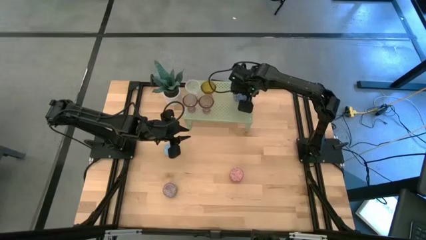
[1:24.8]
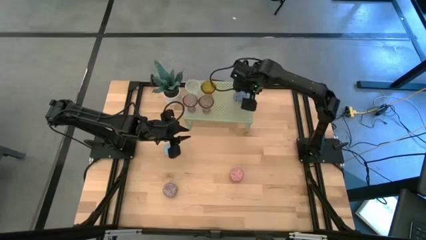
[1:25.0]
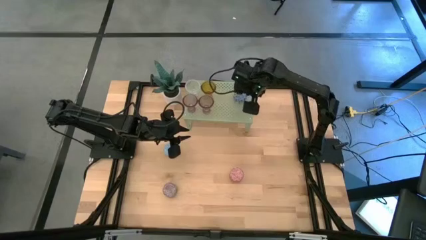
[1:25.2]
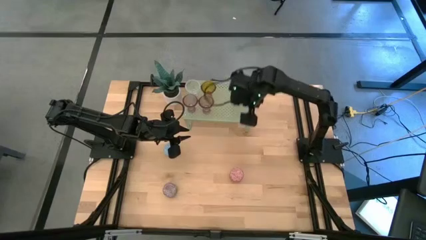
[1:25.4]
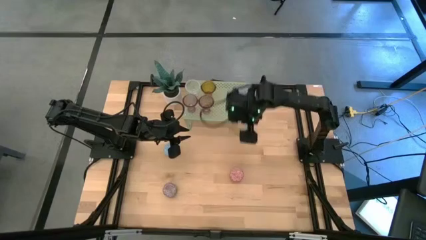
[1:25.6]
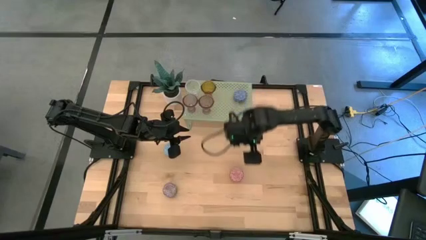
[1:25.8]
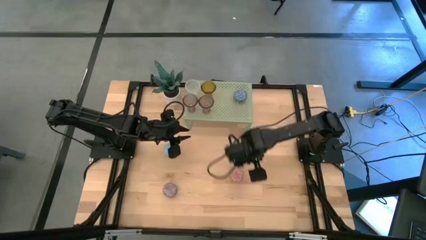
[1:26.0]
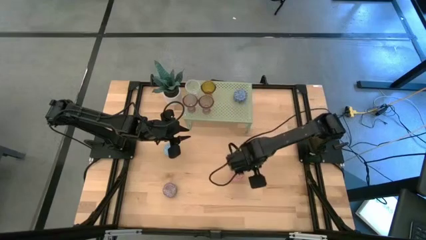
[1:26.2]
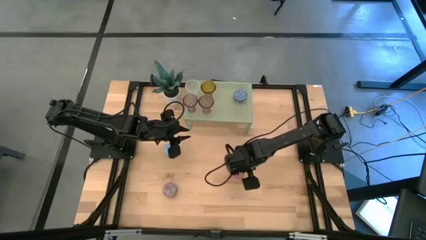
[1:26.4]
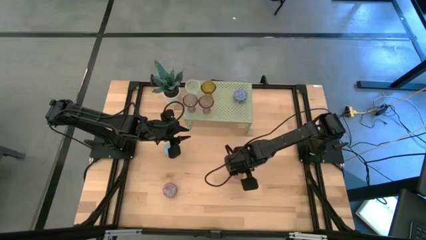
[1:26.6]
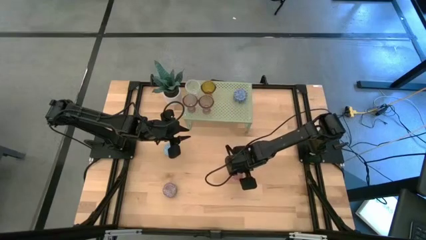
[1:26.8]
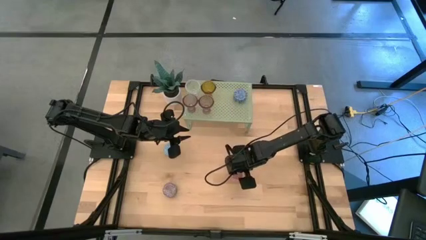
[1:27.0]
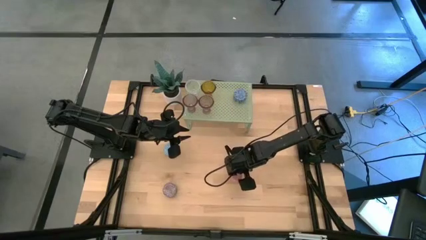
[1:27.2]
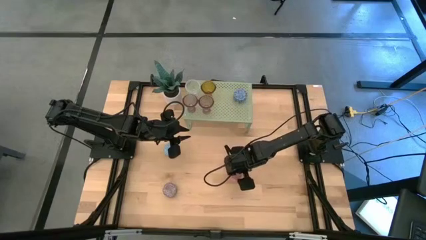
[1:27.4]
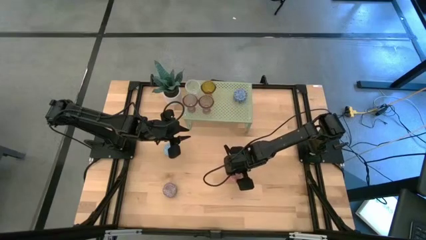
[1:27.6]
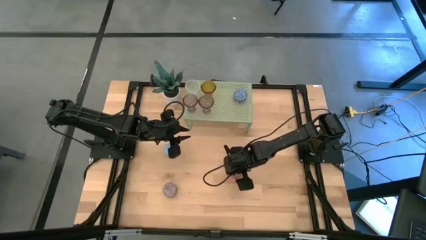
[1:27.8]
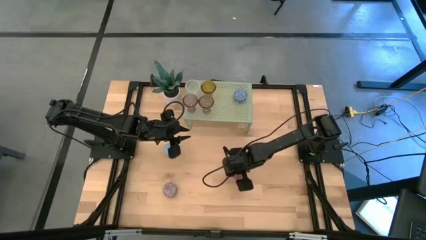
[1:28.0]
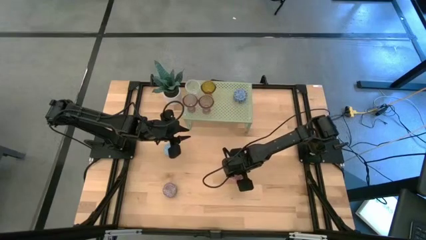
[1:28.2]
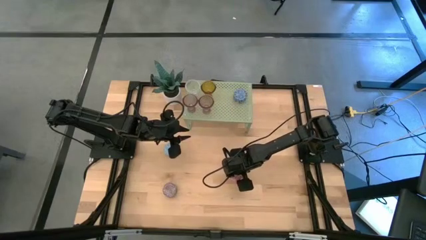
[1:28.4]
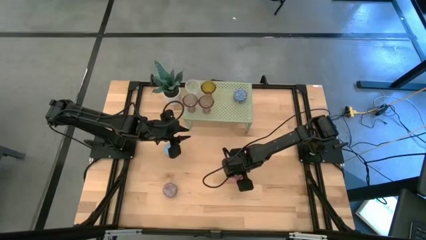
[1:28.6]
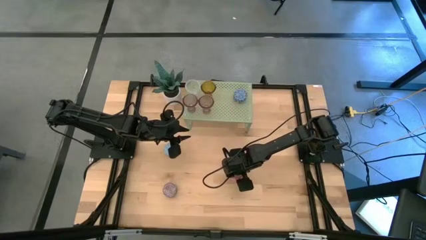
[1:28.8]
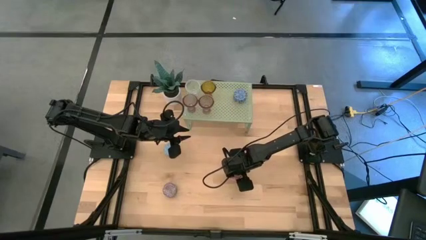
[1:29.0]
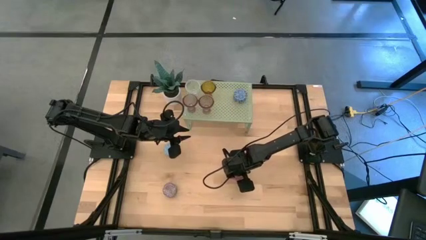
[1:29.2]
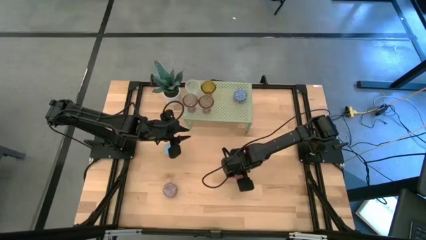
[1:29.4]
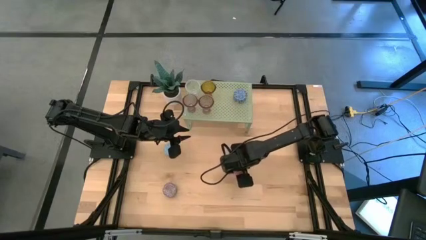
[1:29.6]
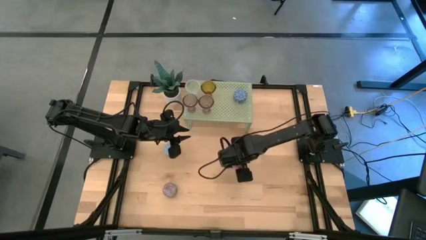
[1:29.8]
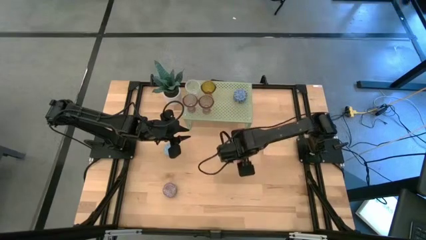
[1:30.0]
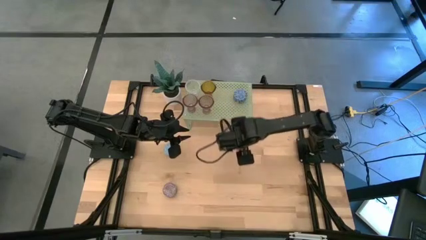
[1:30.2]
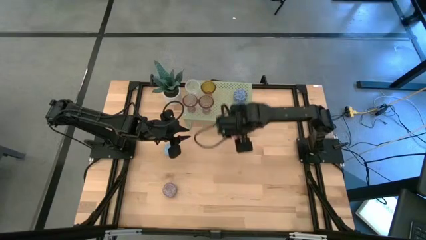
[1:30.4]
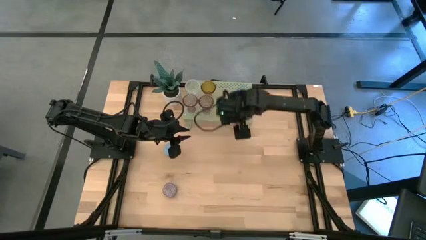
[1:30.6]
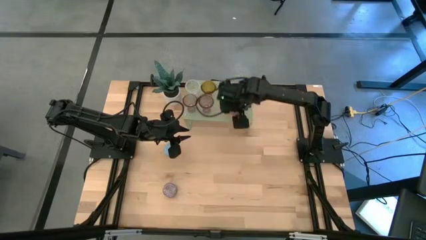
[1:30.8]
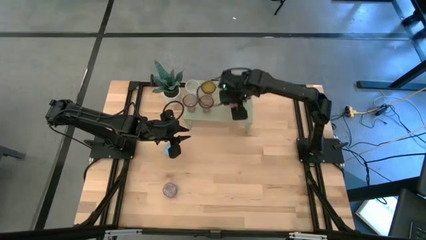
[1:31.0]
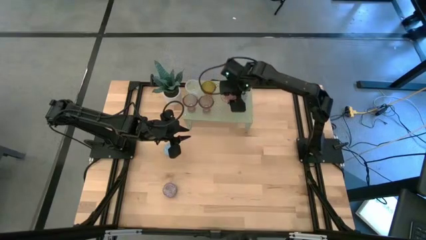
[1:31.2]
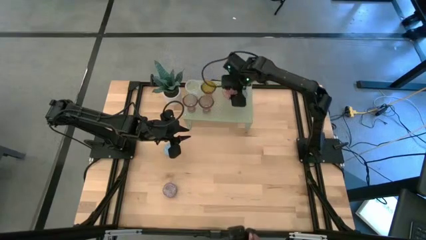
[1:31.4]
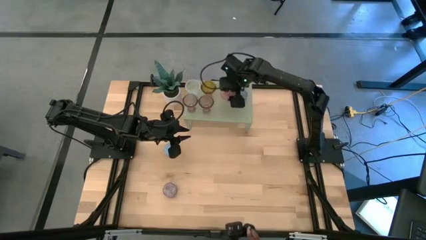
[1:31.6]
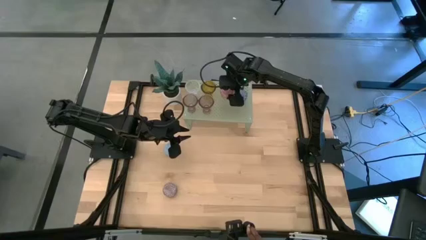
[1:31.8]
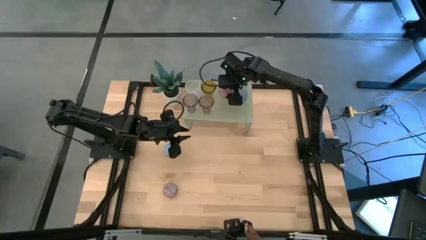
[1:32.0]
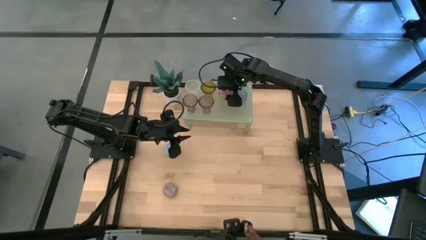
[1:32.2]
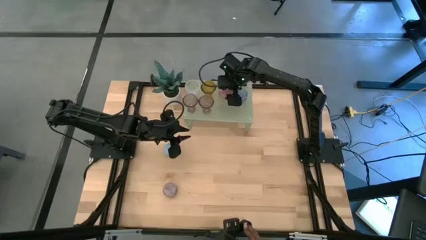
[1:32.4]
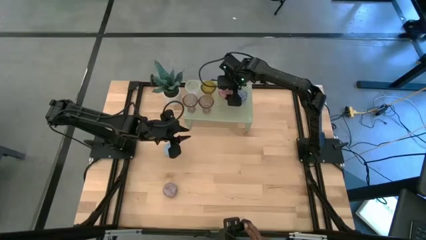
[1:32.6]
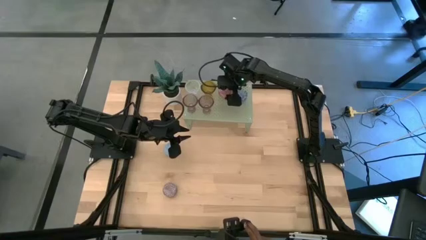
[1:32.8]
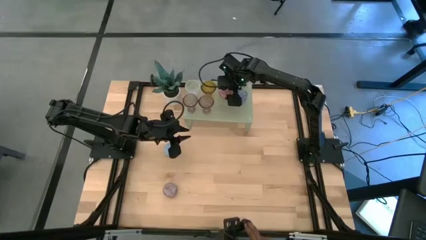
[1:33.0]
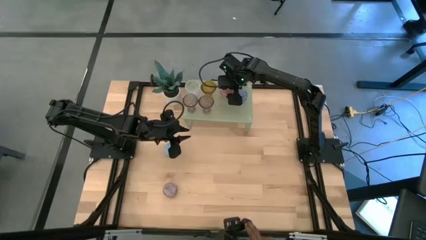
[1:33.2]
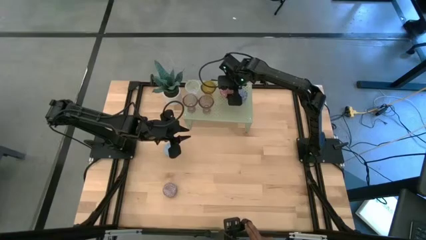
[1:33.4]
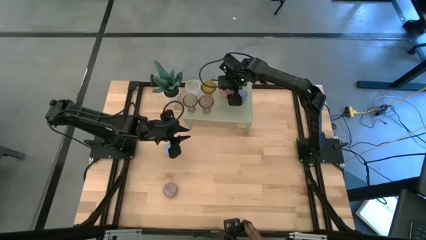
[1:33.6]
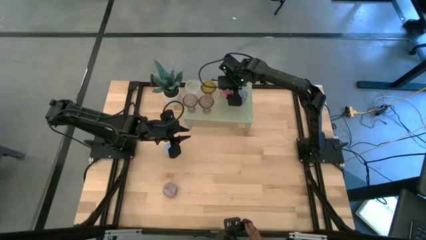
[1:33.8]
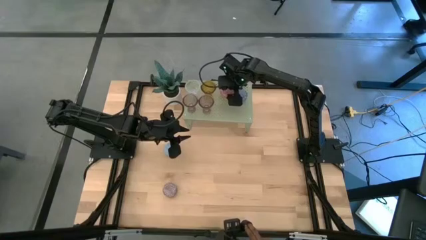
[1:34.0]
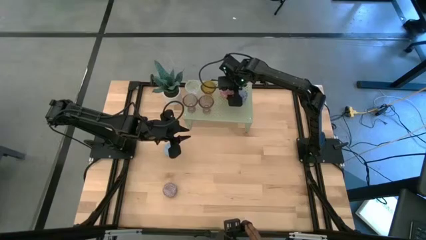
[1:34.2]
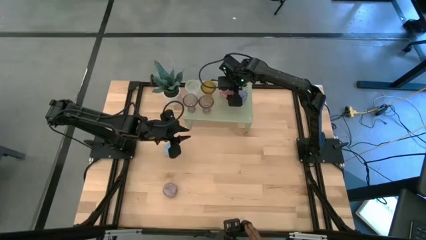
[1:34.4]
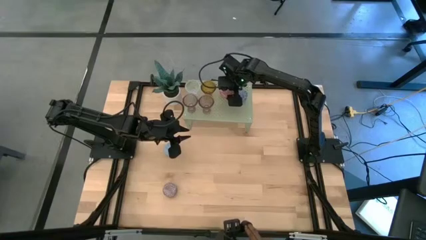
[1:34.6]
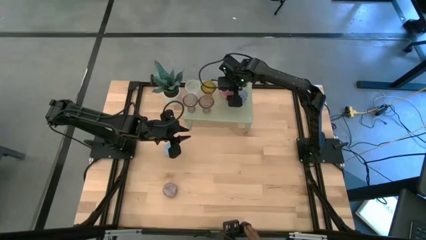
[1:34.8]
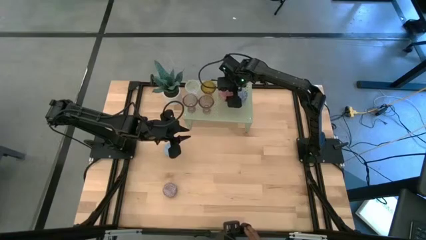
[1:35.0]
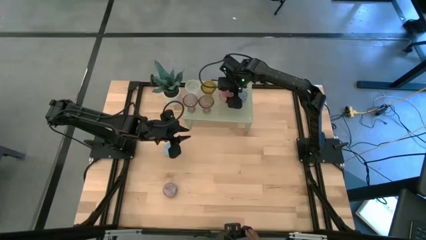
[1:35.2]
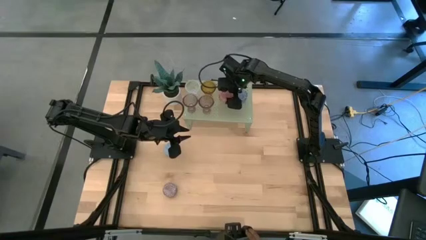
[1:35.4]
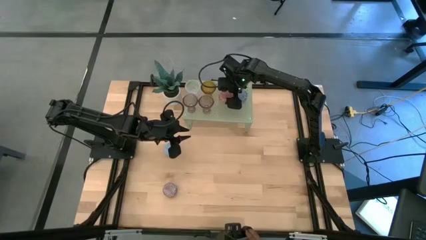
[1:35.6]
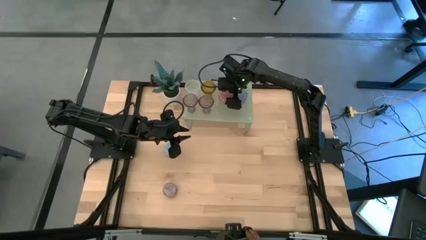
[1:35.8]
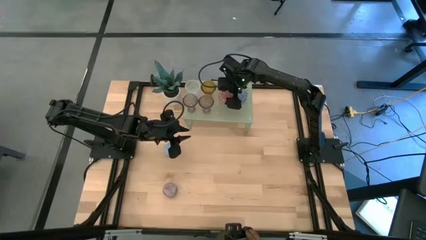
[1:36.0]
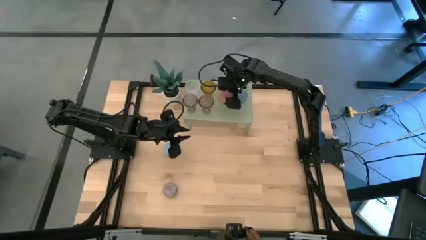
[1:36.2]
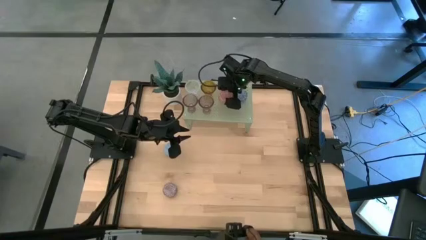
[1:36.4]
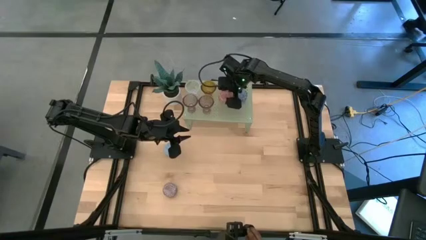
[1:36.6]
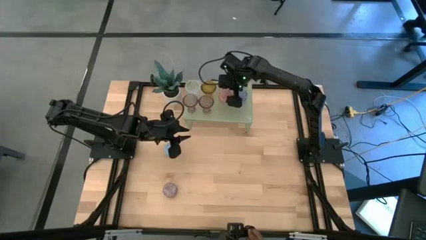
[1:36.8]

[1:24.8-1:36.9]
Task: Pick & Place candle stick holders
Put the pink scented candle on the shelf

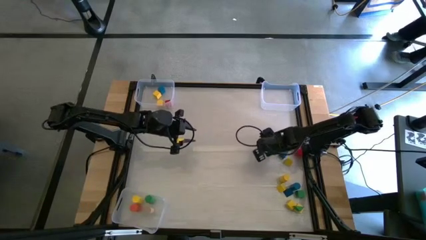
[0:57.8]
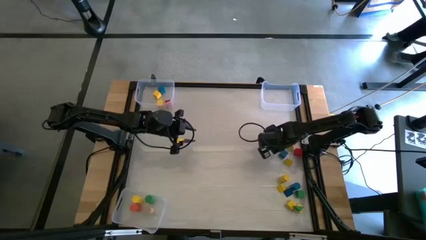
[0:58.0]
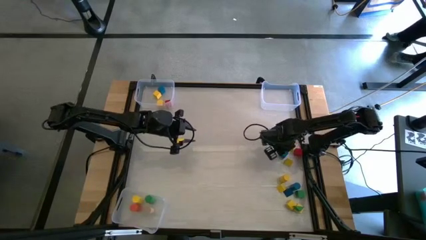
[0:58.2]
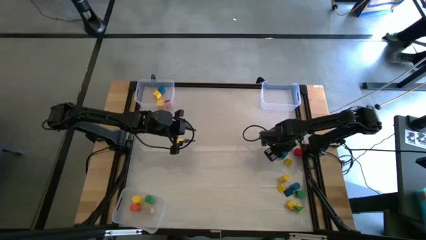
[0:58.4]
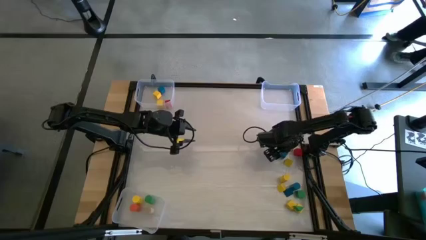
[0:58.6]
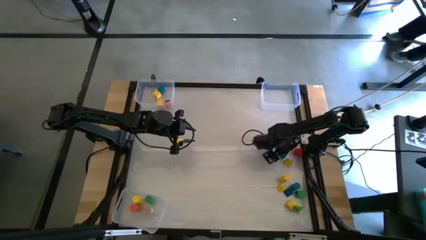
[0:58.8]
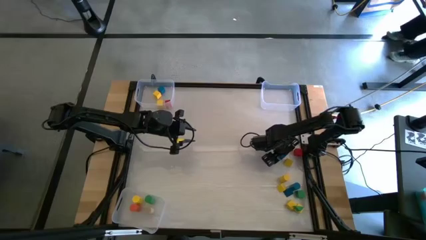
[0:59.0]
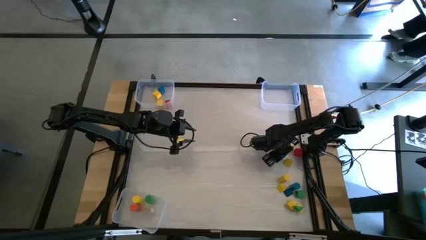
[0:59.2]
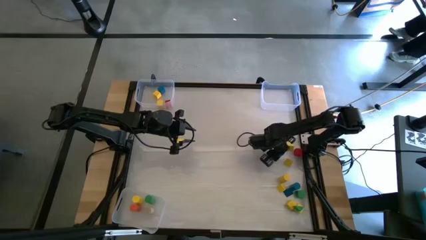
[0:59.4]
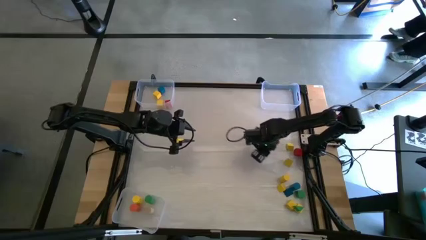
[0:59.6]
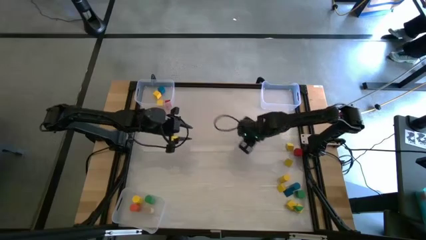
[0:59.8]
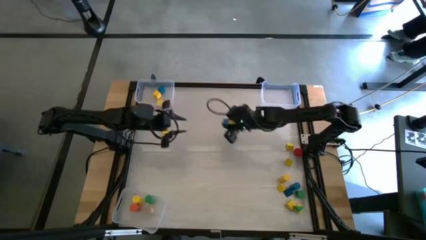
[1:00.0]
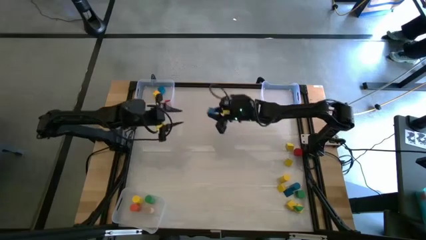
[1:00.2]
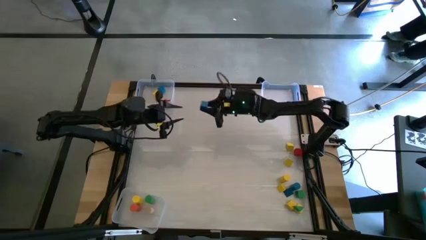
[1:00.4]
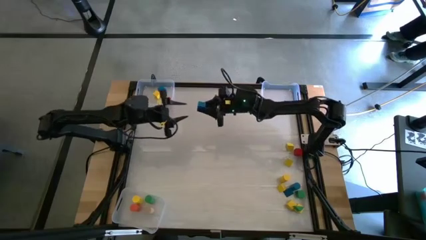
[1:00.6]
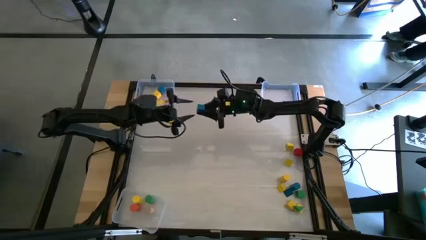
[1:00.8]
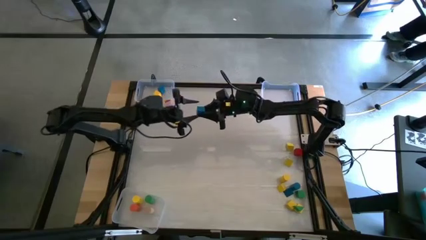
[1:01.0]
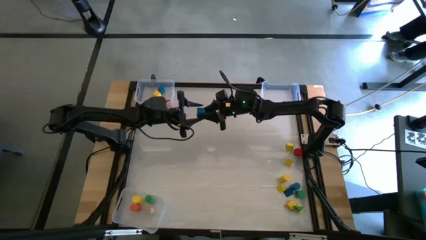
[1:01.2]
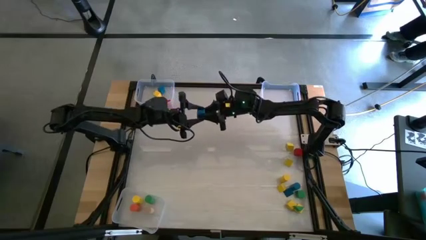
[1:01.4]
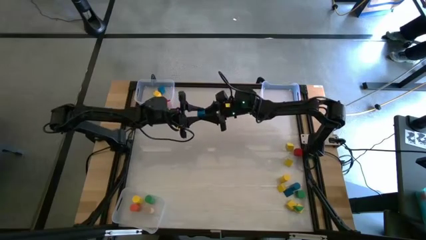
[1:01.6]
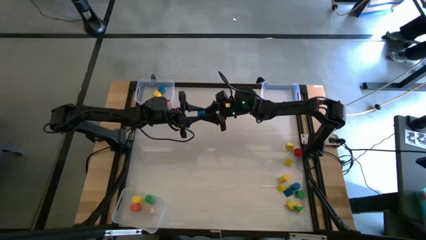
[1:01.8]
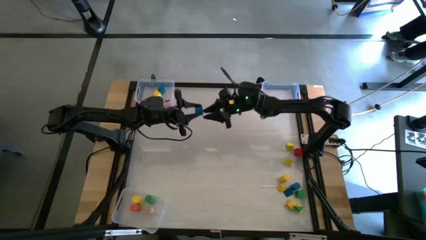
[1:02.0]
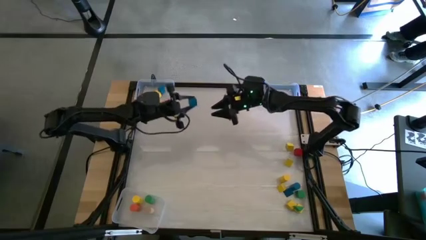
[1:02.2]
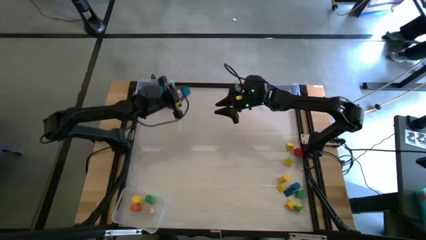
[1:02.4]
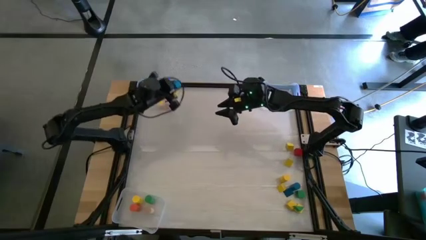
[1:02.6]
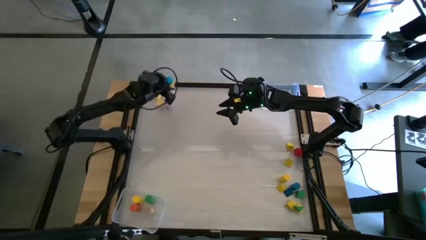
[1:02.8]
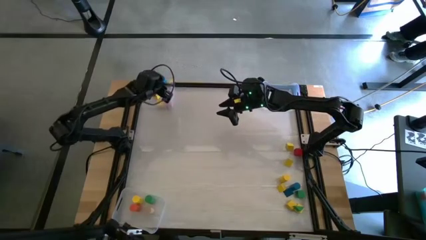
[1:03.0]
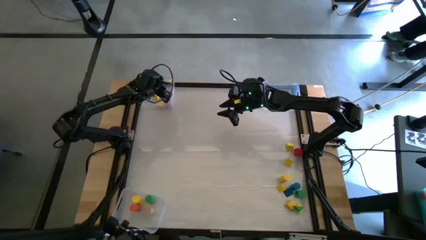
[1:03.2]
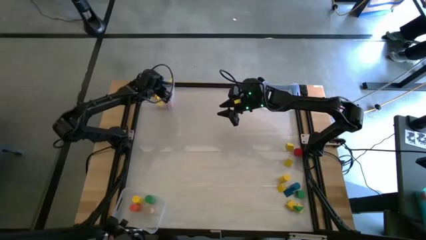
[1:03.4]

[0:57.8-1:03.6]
Task: Sort blocks by size
Put the right blue cube block into the top left transparent bin
